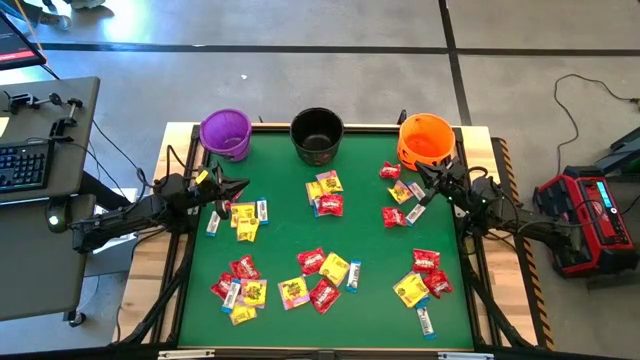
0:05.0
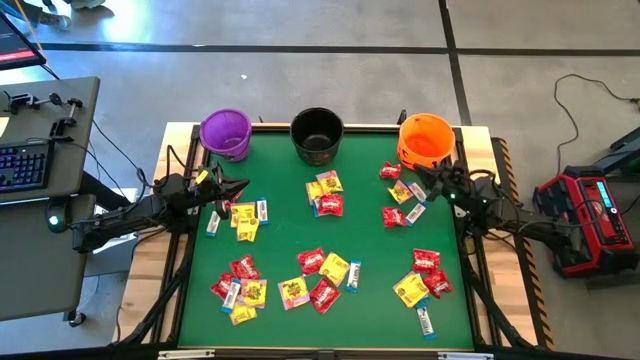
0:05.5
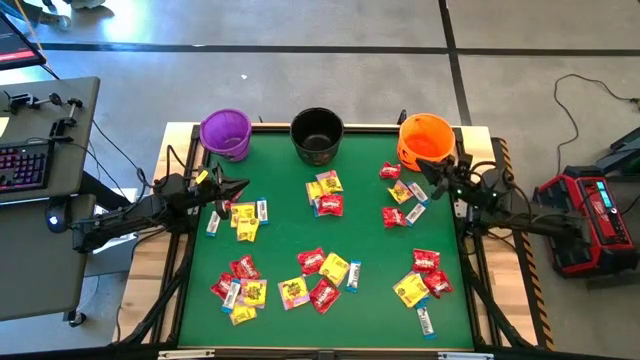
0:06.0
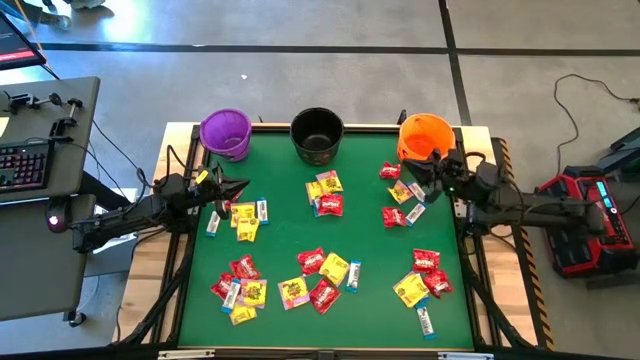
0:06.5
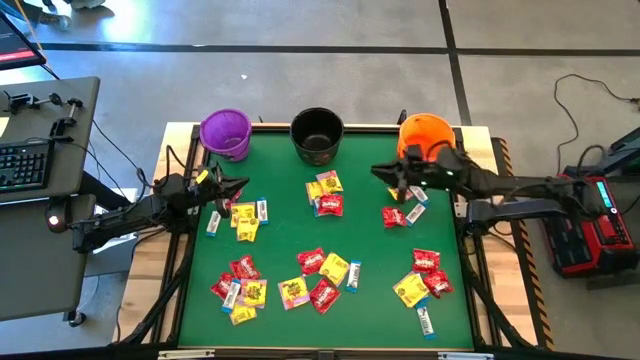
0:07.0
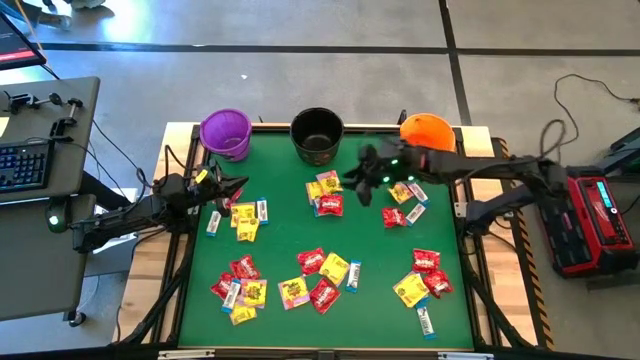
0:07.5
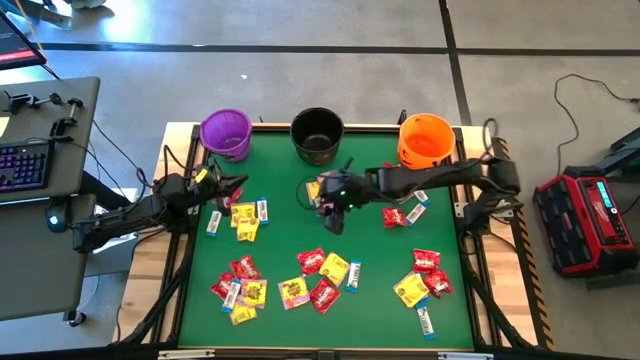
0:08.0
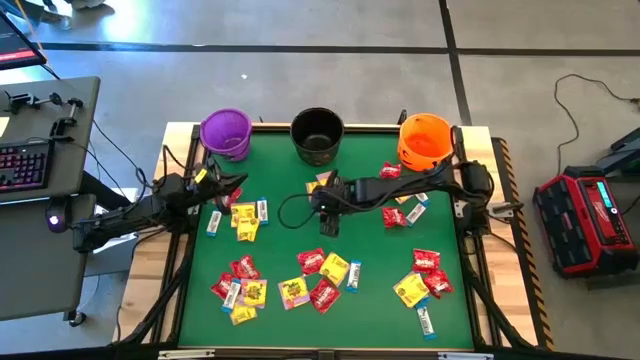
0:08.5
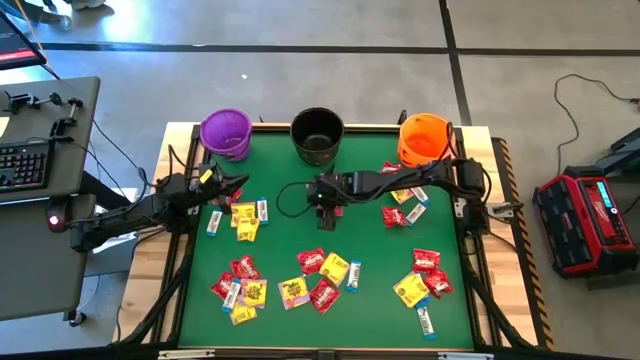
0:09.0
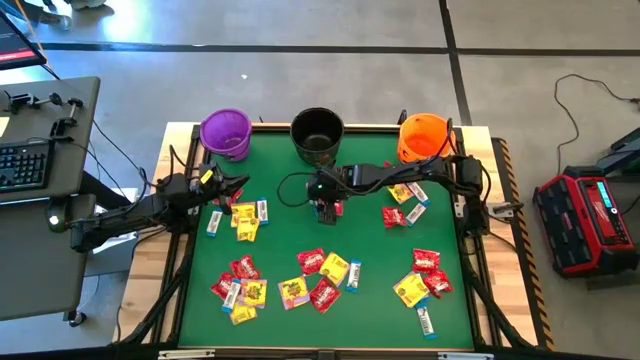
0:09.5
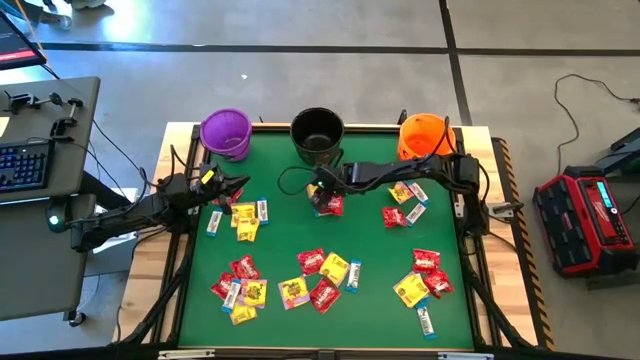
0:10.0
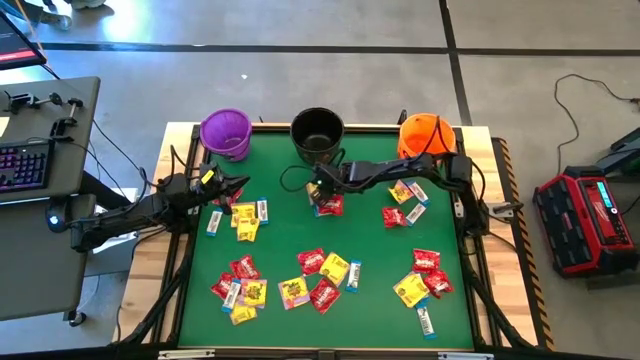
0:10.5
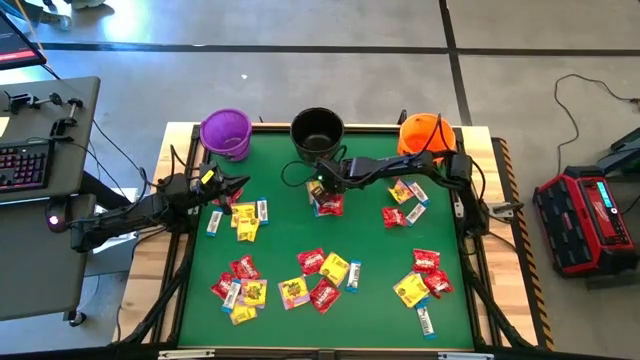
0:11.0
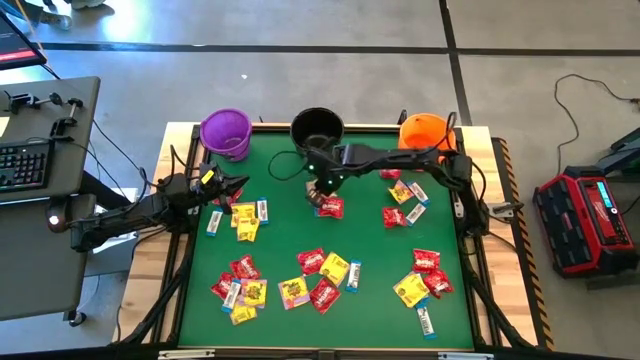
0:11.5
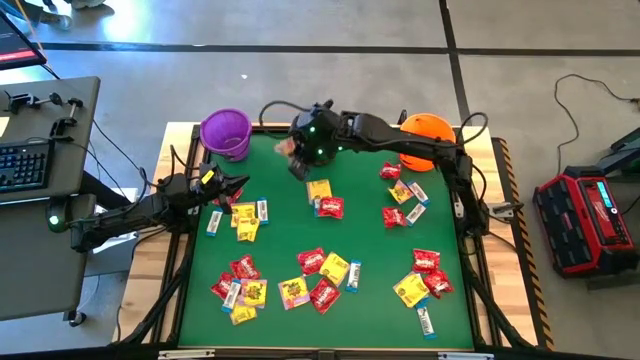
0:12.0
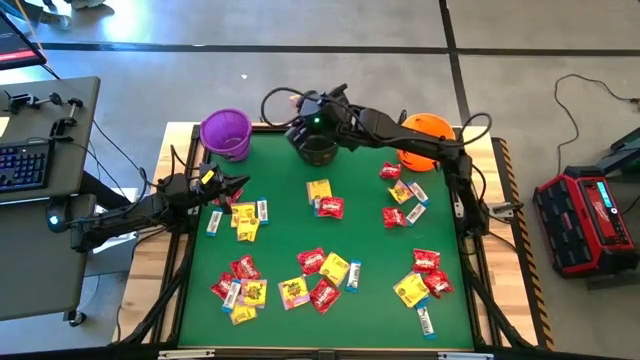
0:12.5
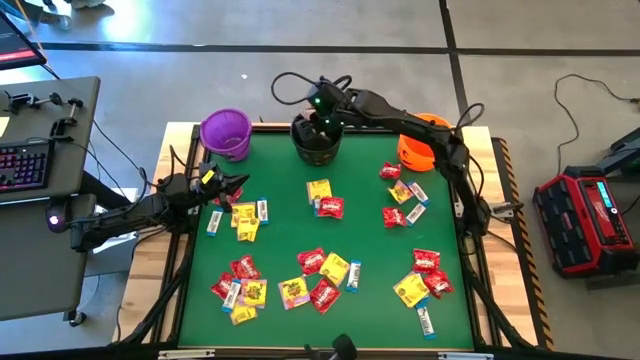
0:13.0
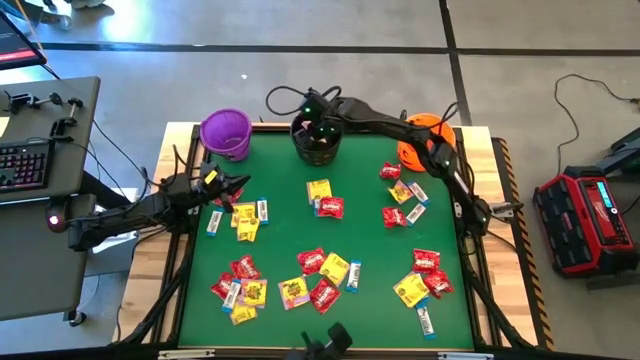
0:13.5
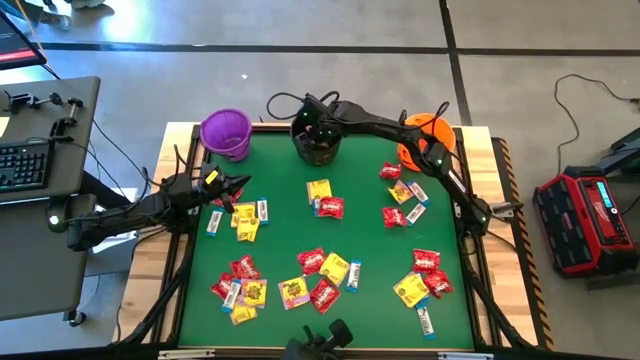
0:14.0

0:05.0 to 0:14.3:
Task: Sort candy by brand, put in halloween buckets
Put the yellow candy pack into the black bucket

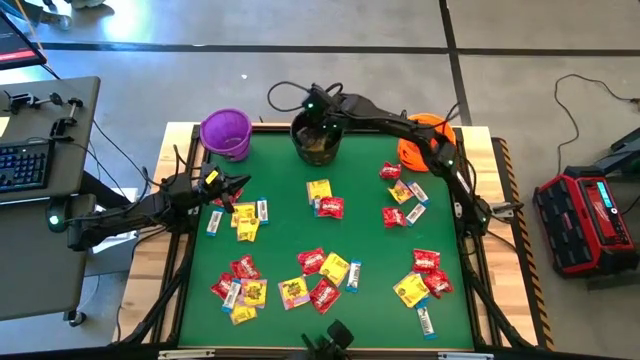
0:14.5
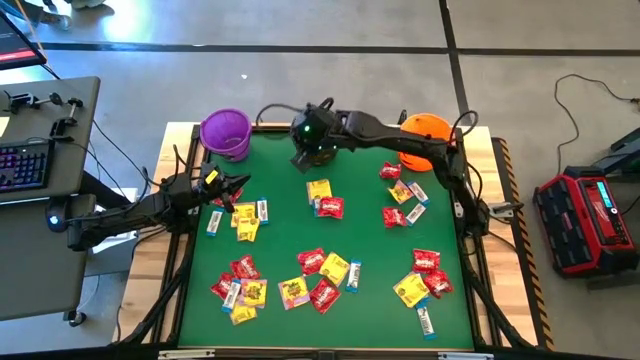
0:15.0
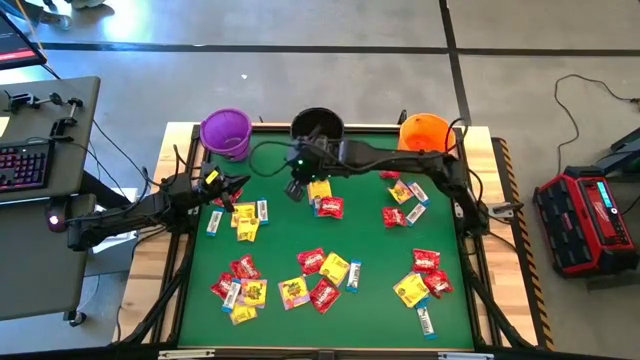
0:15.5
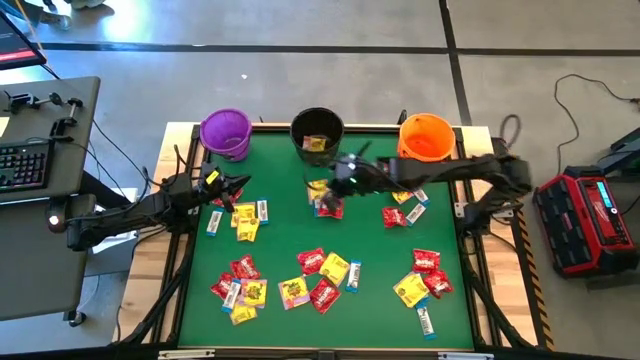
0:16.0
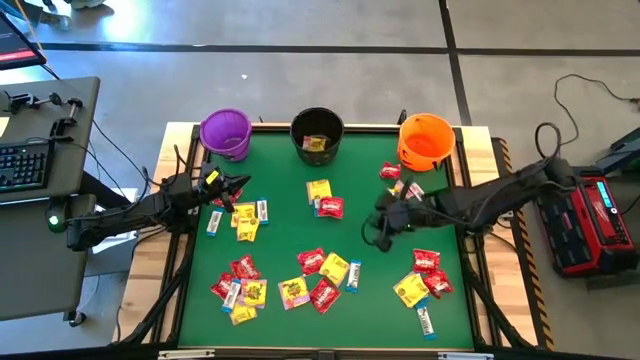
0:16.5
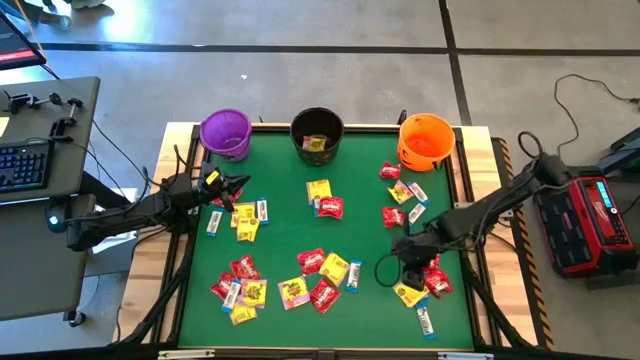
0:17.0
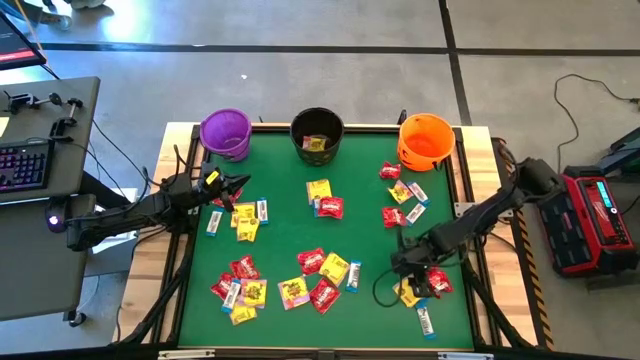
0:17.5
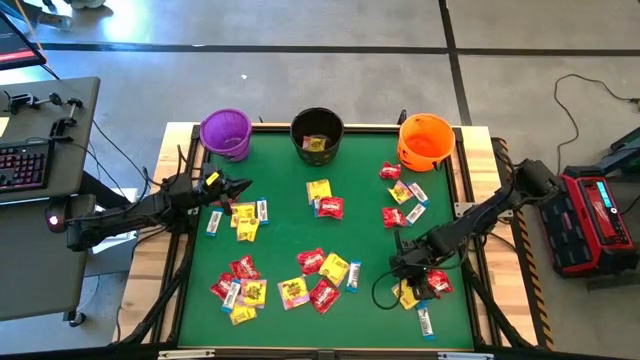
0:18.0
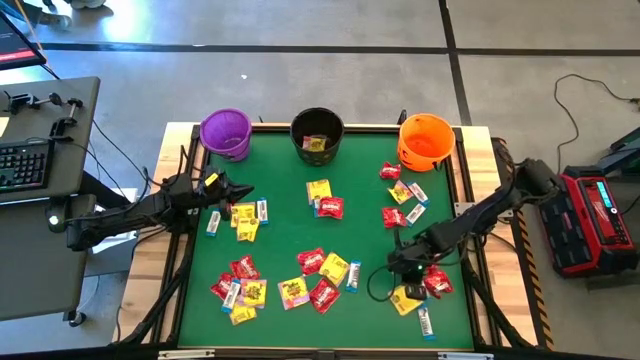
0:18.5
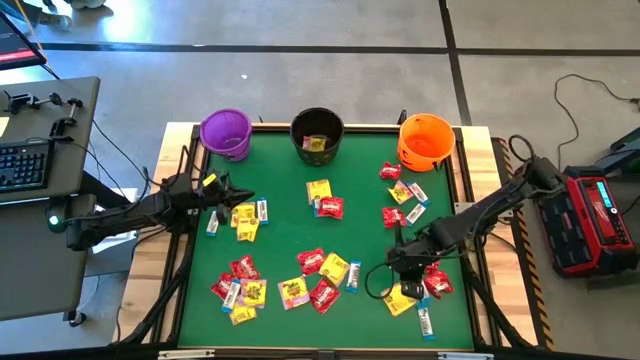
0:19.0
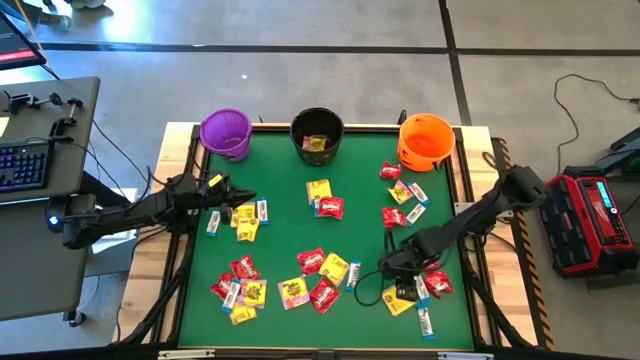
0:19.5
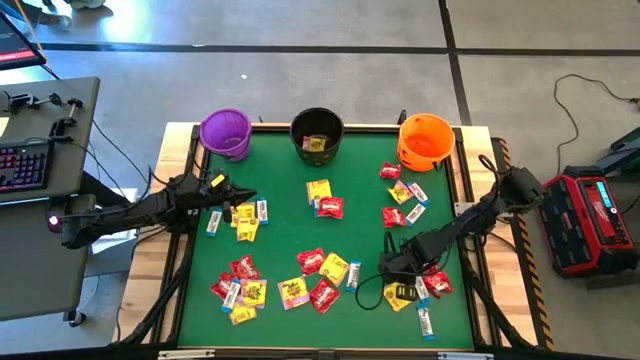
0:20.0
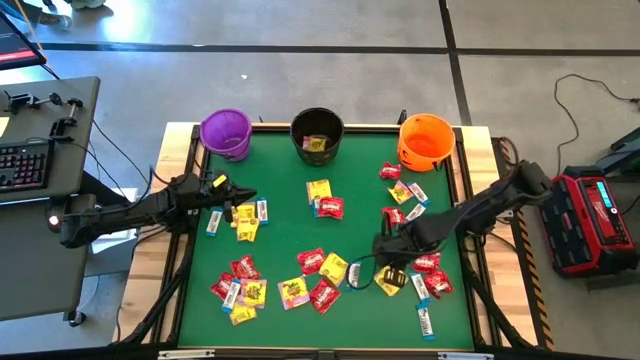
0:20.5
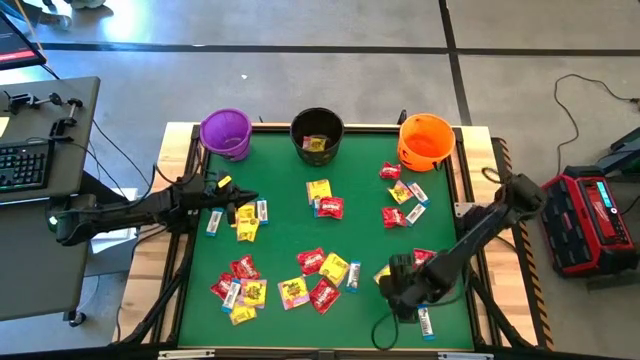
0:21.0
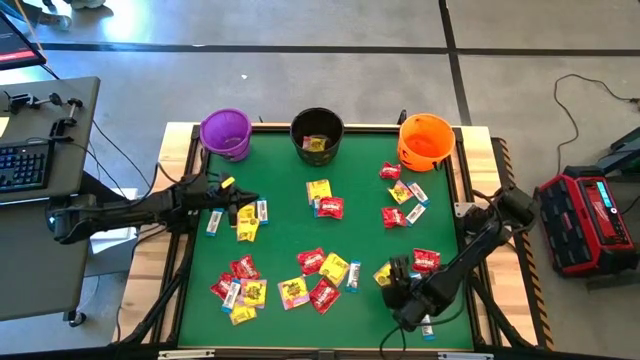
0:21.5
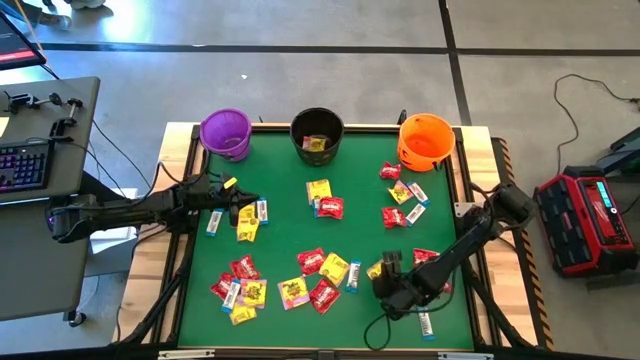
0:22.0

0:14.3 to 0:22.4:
Put the yellow candy pack into the black bucket

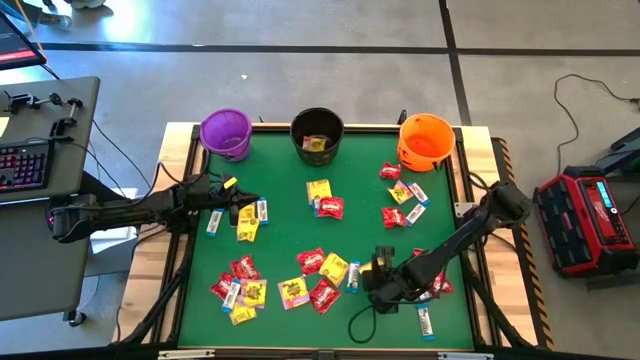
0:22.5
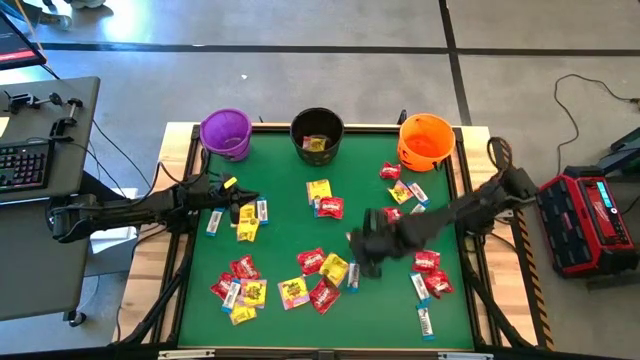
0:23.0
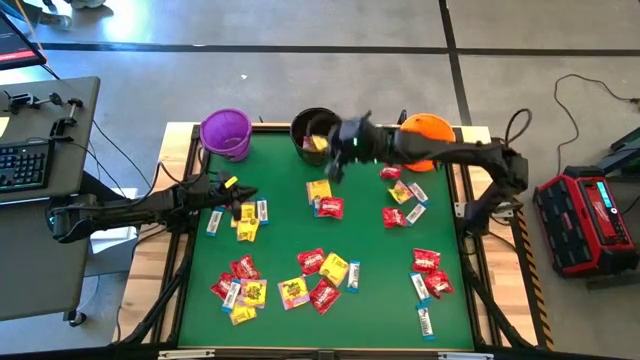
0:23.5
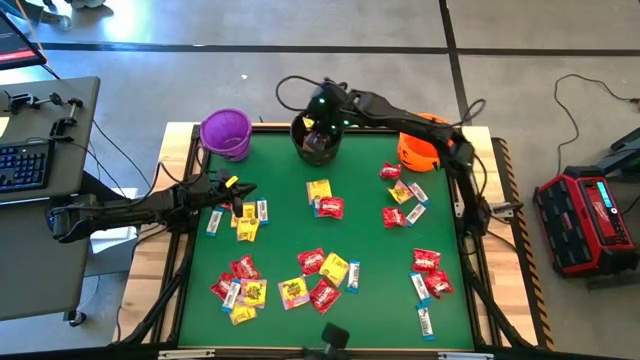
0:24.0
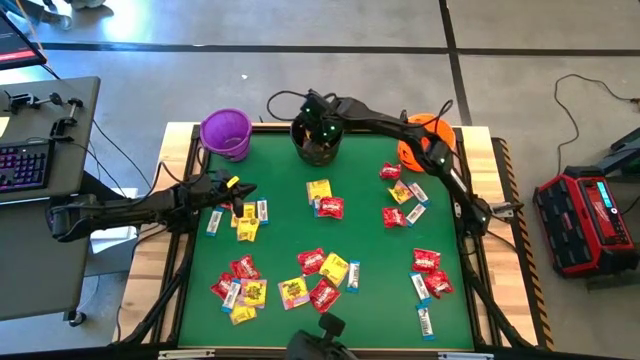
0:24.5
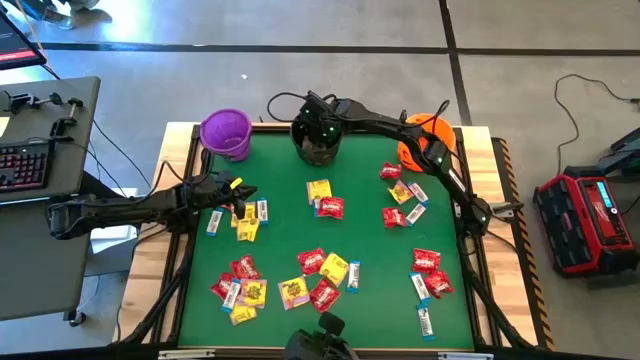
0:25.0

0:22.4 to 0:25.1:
Put the yellow candy pack into the black bucket

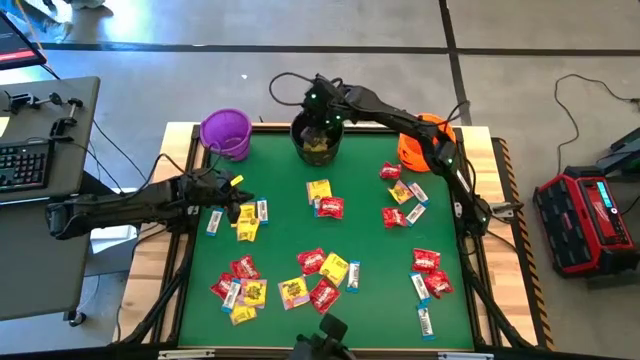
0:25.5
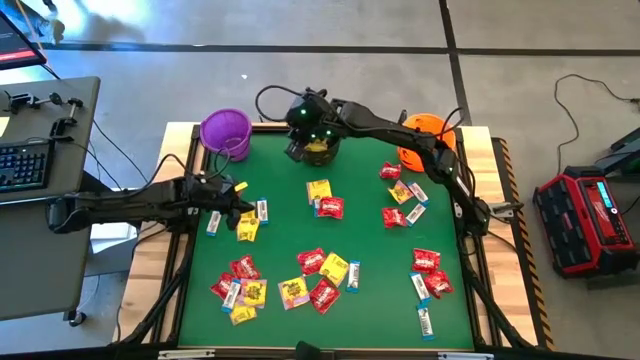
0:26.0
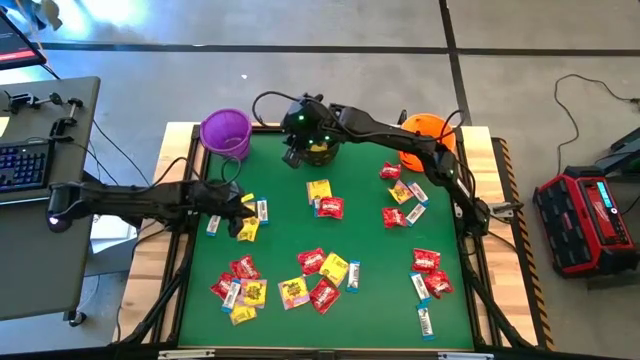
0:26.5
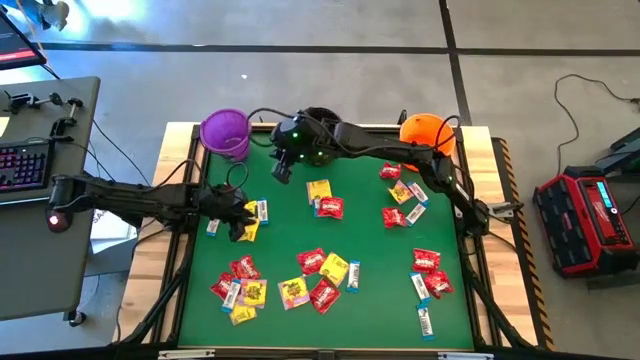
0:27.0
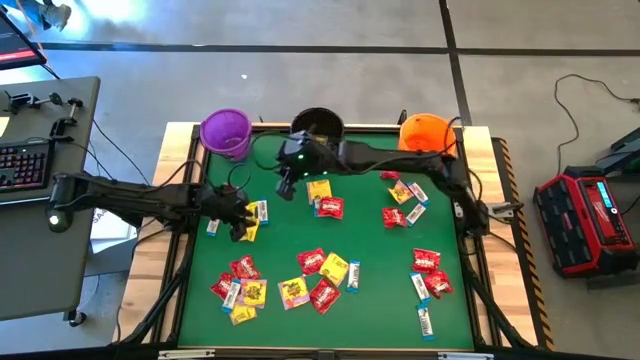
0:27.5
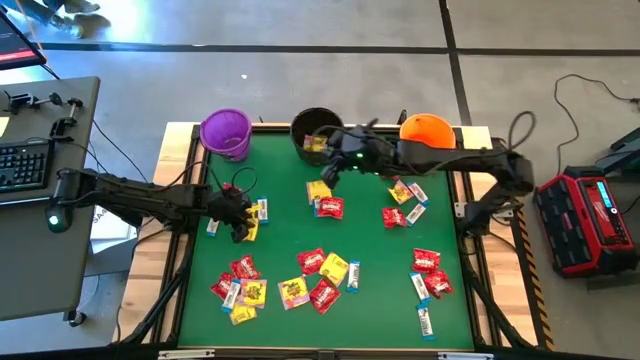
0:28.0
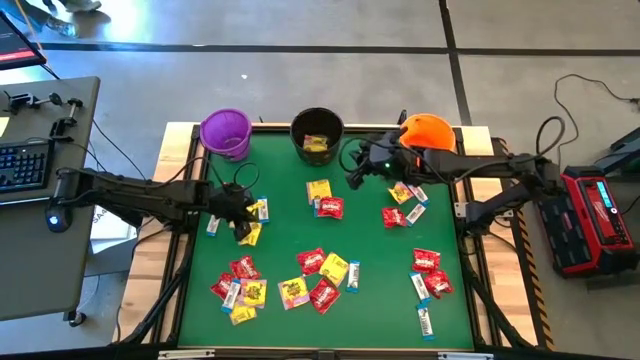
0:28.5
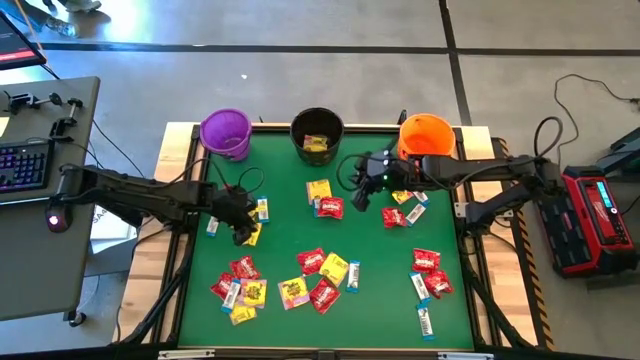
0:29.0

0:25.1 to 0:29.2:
Put the yellow candy pack into the black bucket
